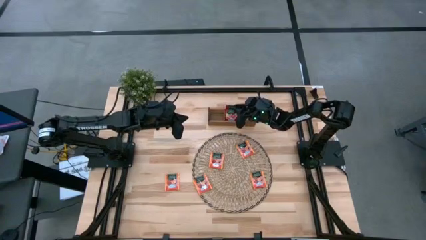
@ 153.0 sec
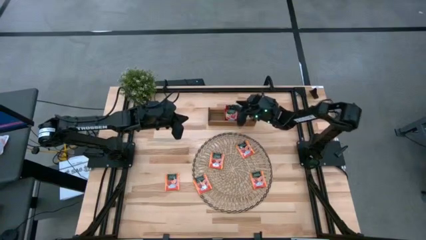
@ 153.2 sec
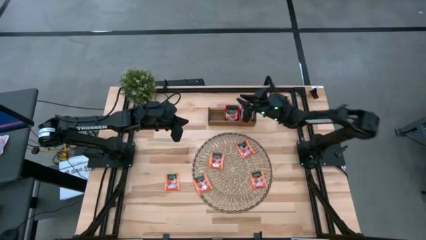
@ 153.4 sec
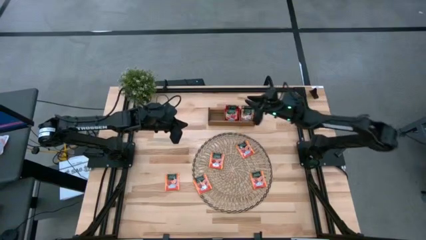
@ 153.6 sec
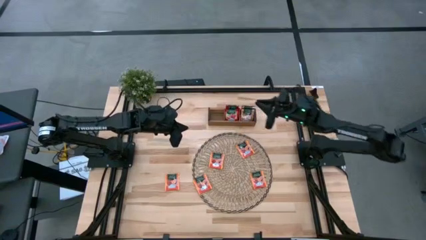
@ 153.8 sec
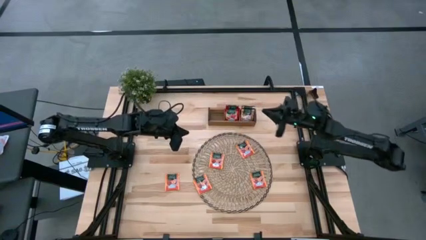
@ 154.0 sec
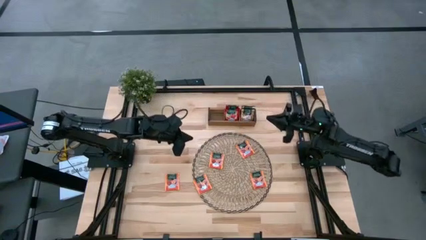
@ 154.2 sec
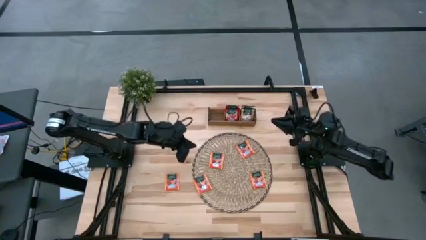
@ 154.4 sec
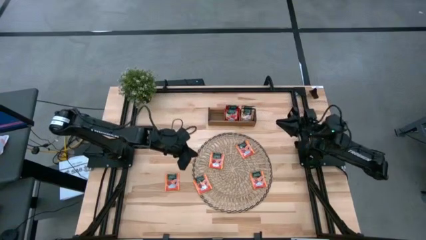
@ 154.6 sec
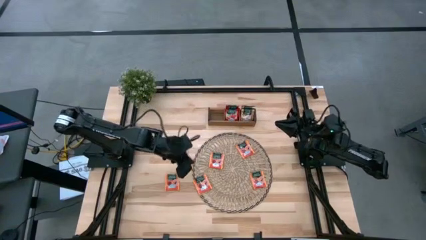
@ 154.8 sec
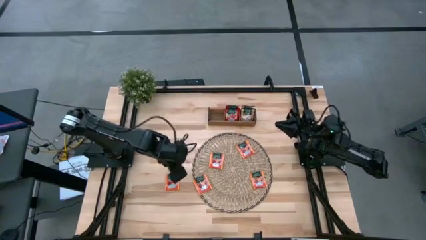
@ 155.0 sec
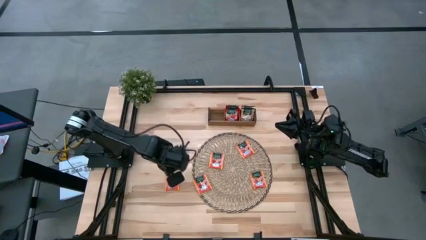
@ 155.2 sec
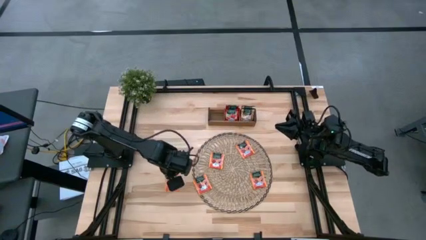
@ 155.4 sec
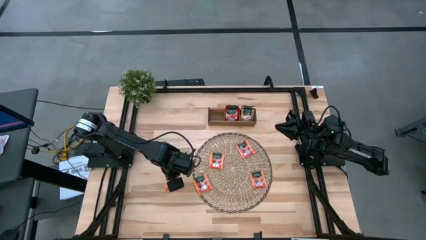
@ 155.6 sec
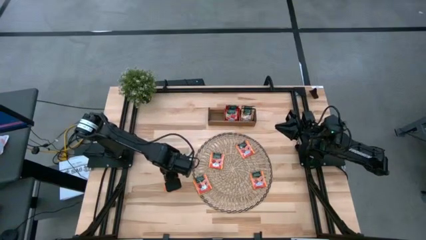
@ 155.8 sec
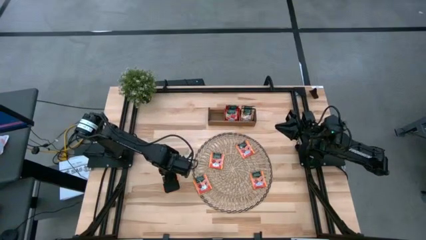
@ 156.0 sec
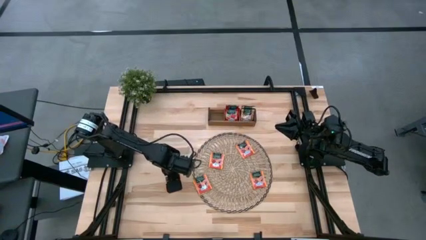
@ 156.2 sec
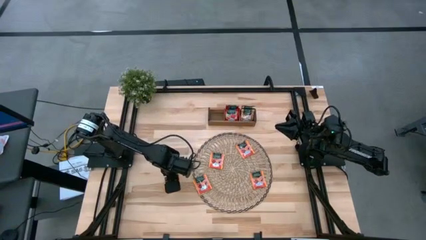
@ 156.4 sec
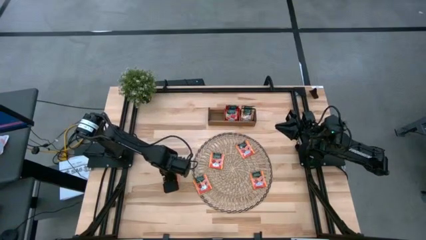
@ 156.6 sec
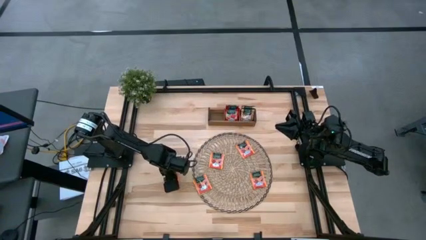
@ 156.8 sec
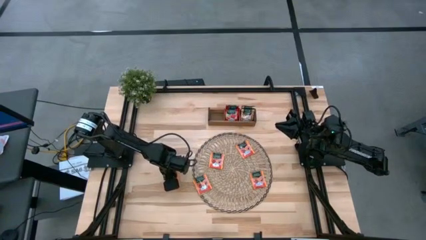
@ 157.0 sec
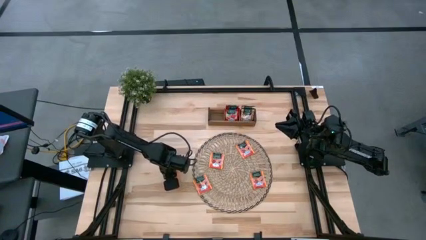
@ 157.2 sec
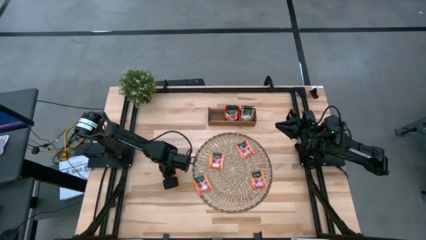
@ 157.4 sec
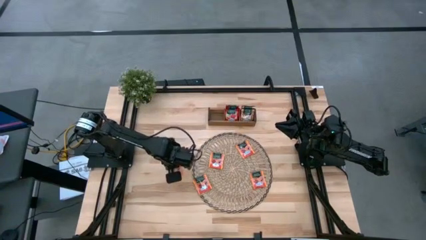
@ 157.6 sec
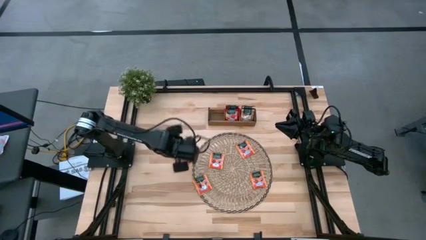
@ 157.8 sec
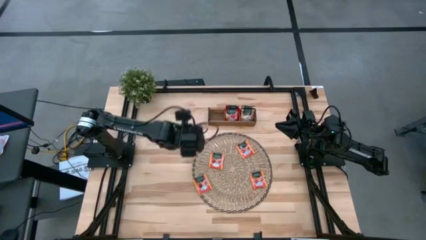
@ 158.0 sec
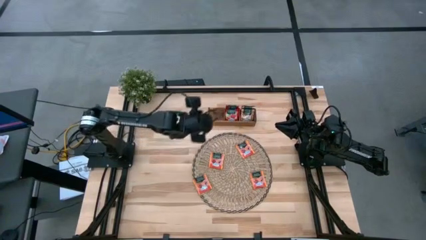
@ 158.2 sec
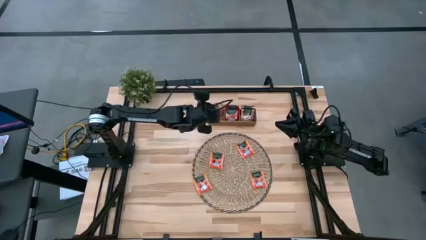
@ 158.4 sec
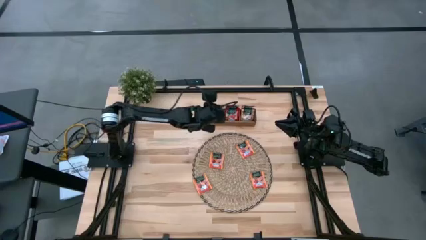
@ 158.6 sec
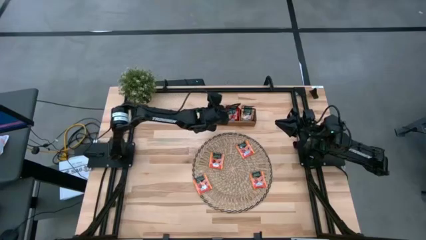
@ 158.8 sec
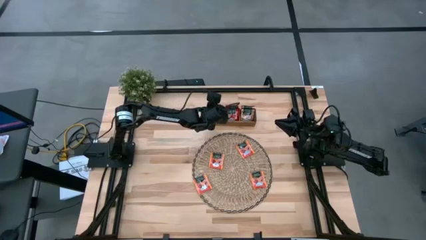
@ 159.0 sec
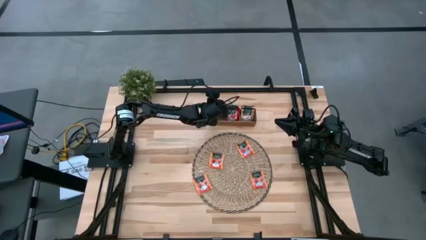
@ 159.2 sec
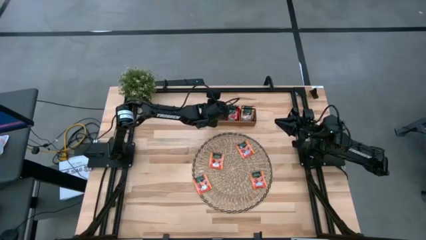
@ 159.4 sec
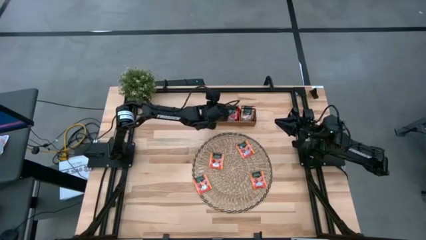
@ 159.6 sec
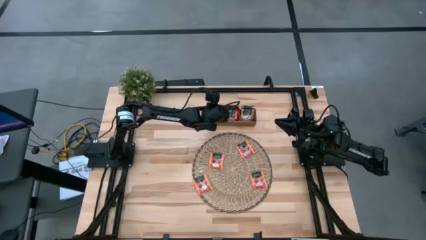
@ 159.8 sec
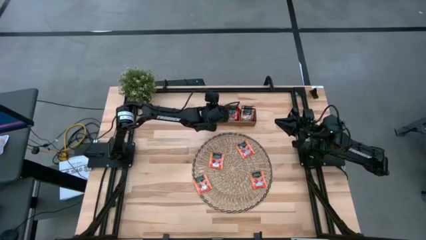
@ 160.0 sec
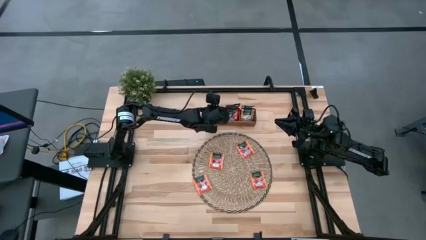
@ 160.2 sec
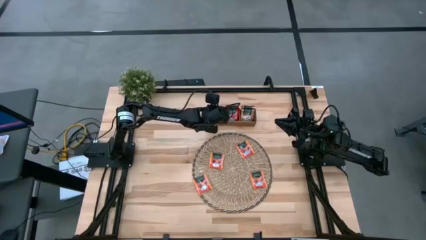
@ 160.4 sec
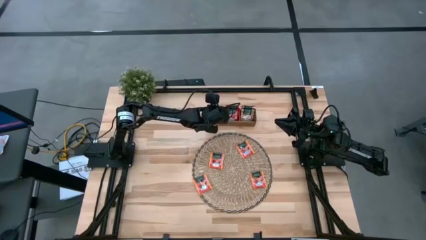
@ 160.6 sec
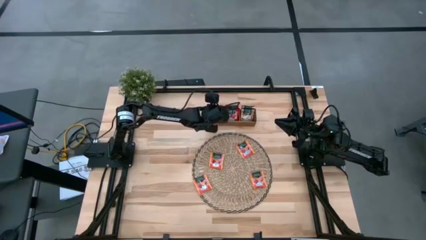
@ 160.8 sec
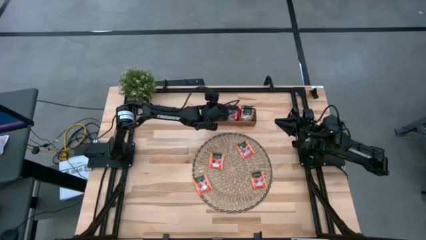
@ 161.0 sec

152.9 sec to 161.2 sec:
Task: Pick & Place Tea
Put the orange tea bag into the left section of the wooden organizer

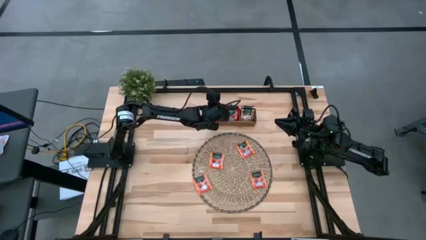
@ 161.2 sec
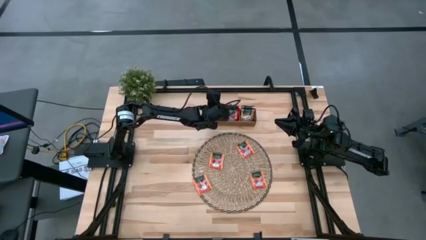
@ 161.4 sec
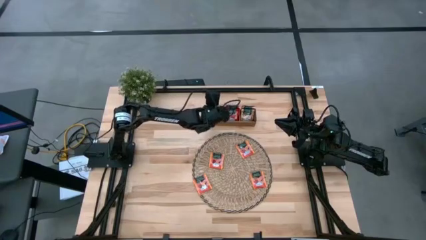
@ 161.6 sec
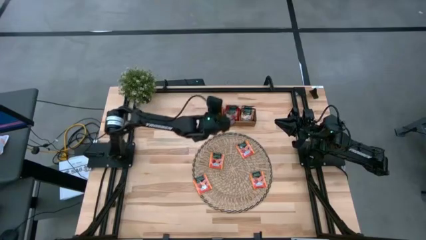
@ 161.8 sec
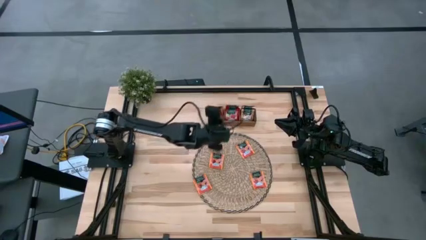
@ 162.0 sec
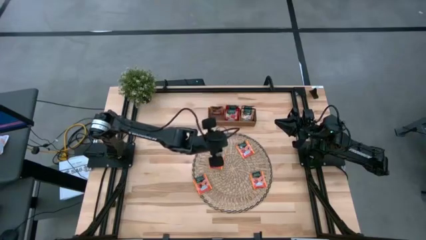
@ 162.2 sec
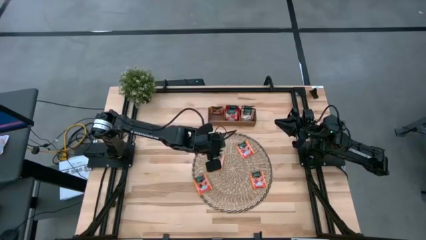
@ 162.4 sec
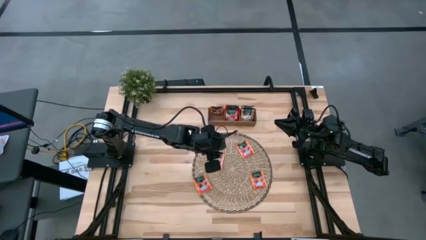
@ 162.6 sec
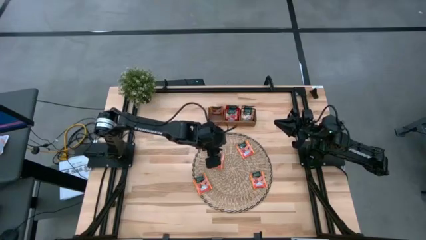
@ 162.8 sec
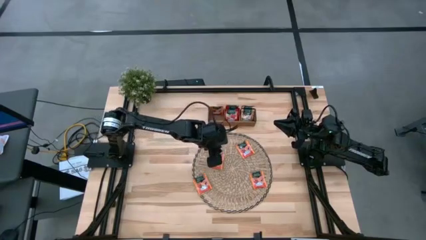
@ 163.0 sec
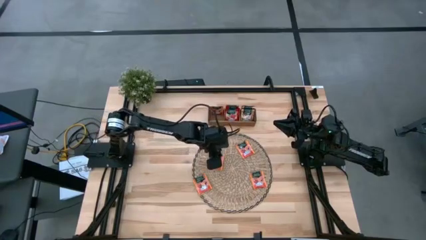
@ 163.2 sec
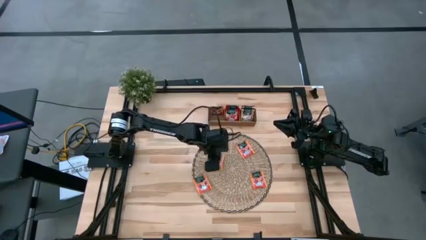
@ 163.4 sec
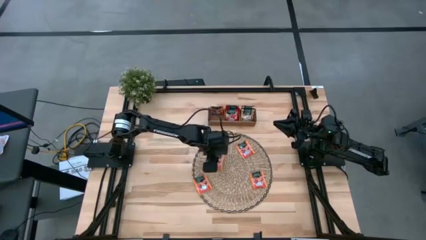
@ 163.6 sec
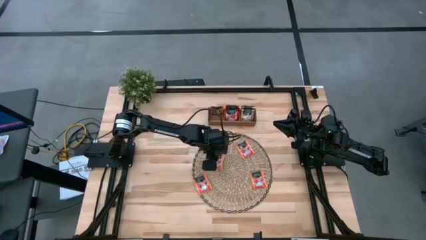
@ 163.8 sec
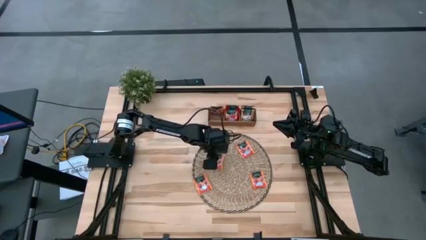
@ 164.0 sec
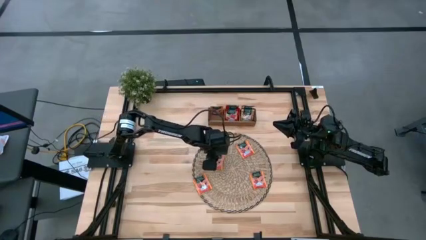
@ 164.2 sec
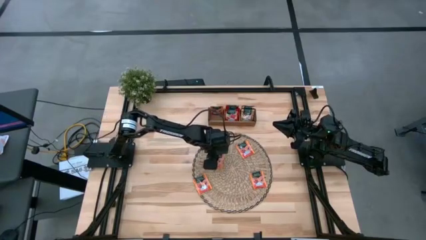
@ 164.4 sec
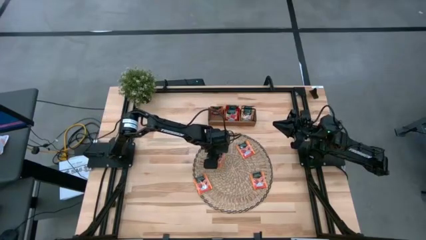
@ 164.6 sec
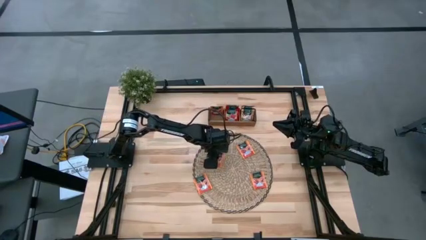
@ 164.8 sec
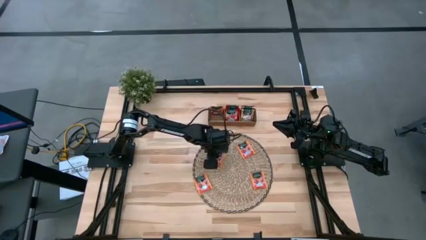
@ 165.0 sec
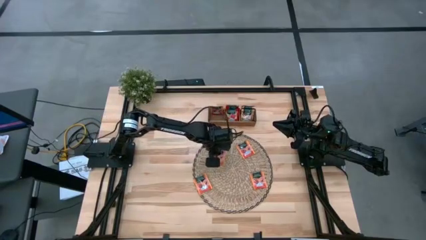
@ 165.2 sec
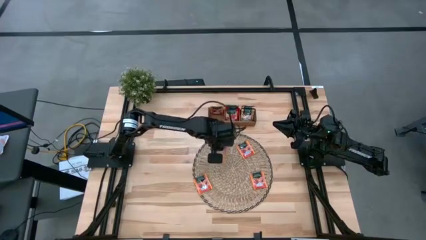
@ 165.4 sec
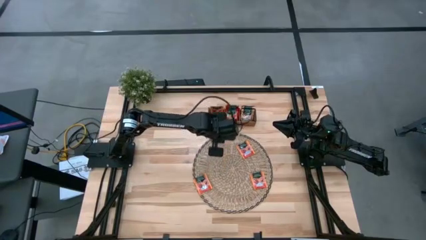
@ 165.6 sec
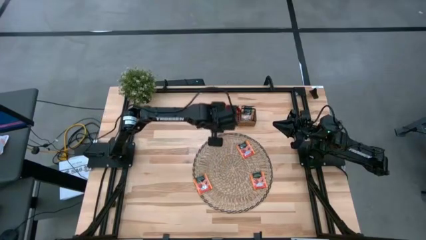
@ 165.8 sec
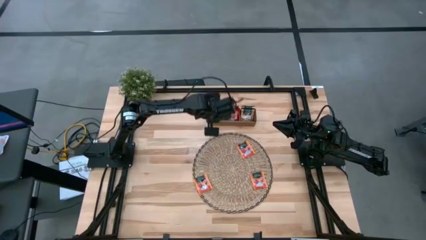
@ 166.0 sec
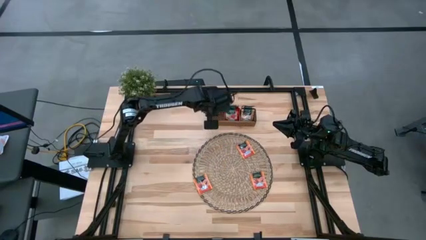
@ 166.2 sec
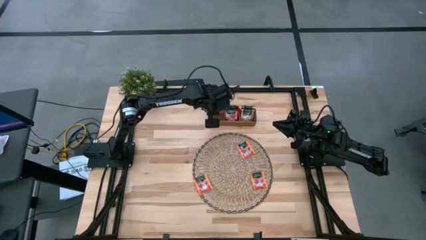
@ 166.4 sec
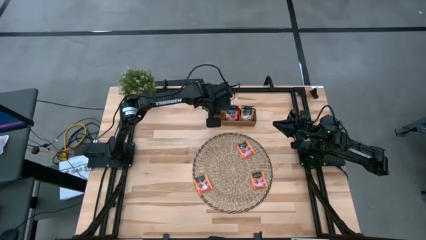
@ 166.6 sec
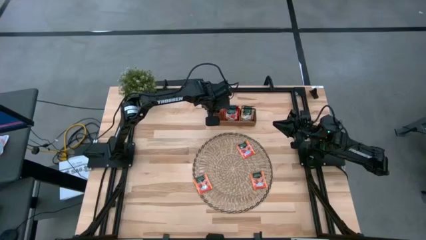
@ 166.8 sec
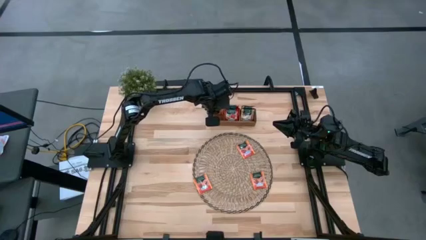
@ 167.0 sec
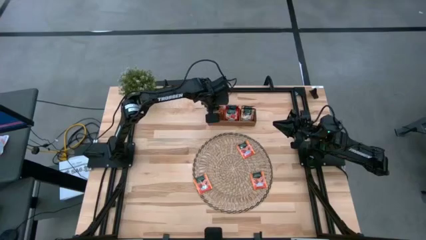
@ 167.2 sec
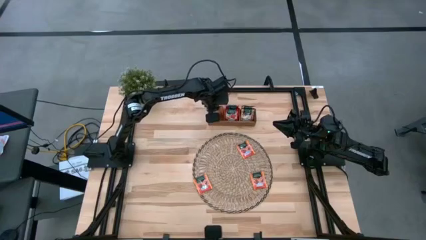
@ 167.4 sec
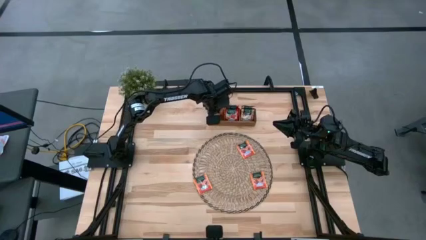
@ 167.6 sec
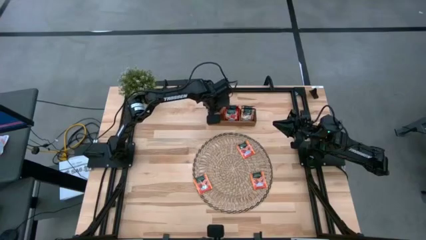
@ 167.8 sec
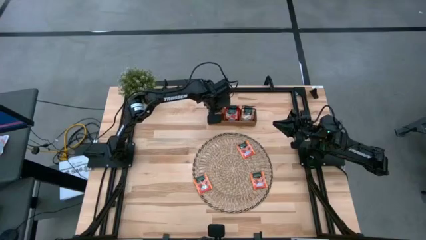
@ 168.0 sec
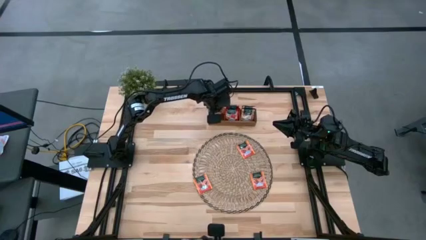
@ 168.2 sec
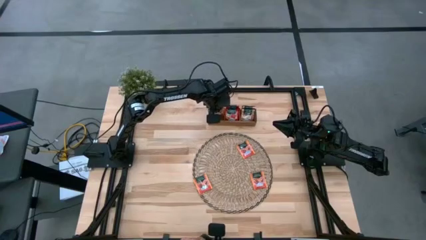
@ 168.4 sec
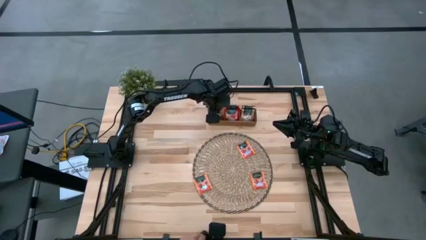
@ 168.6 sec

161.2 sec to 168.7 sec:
Put the orange tea bag into the left section of the wooden organizer
